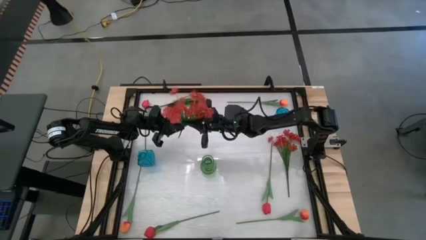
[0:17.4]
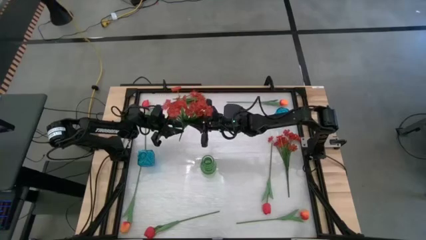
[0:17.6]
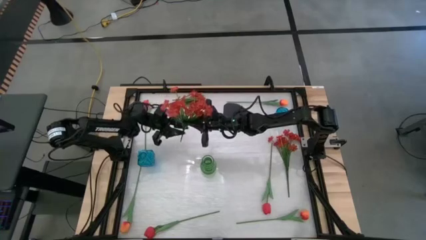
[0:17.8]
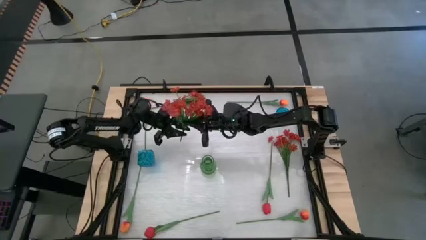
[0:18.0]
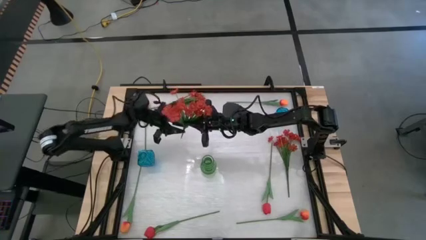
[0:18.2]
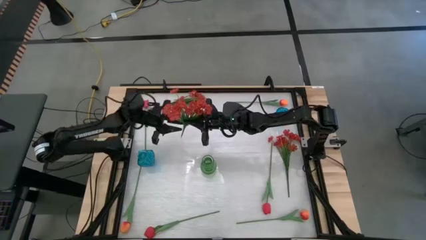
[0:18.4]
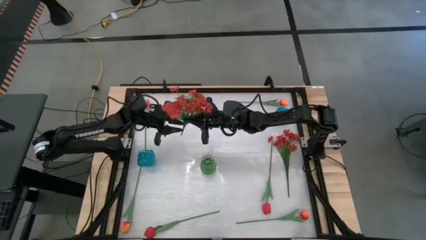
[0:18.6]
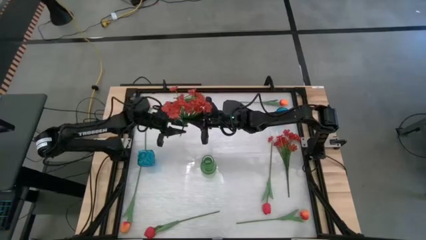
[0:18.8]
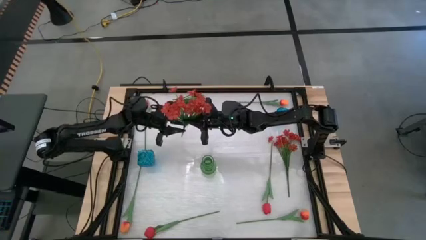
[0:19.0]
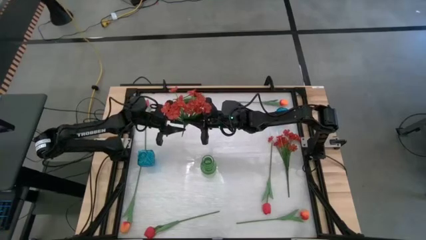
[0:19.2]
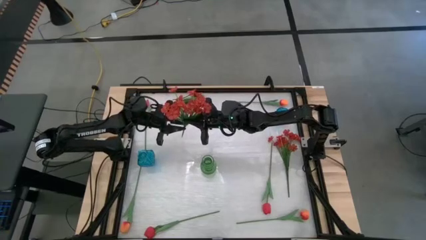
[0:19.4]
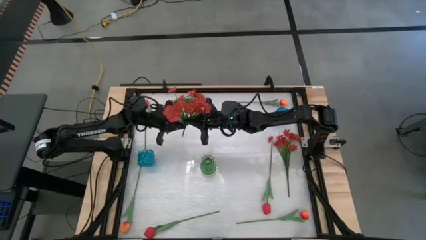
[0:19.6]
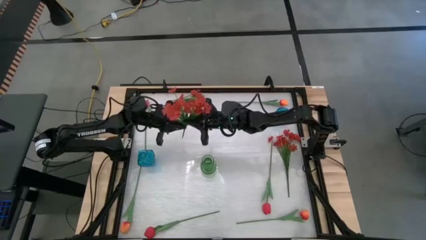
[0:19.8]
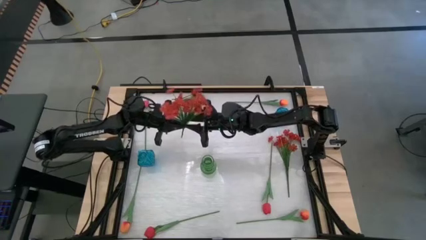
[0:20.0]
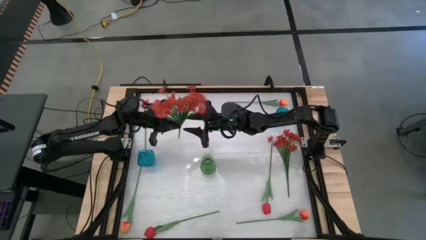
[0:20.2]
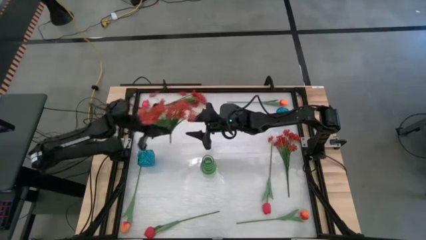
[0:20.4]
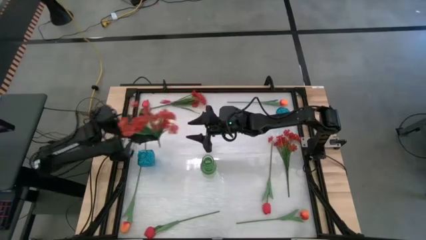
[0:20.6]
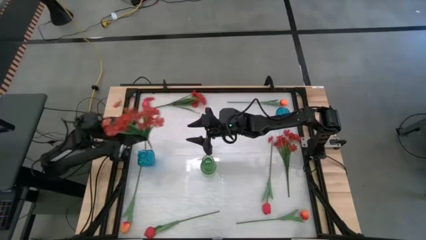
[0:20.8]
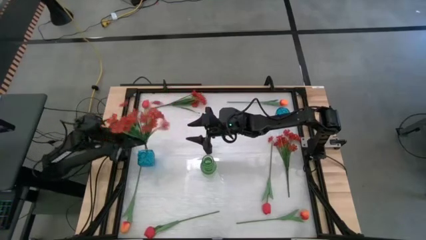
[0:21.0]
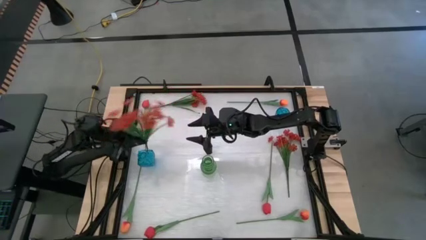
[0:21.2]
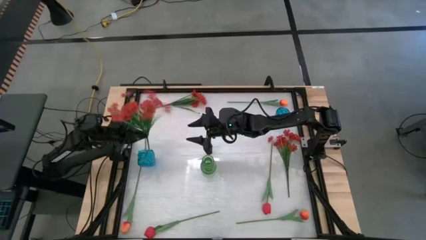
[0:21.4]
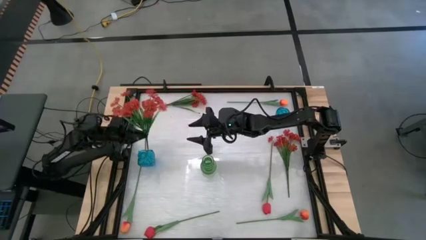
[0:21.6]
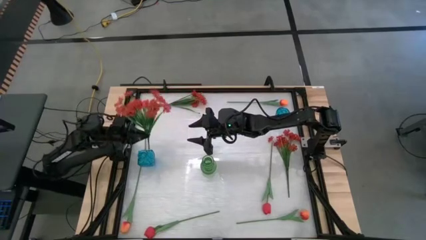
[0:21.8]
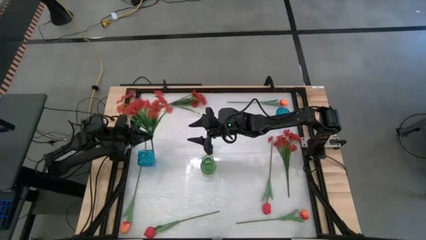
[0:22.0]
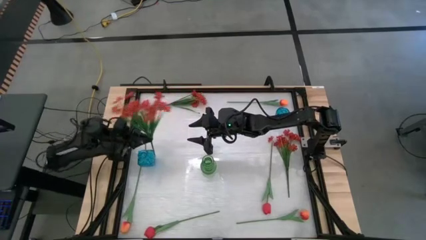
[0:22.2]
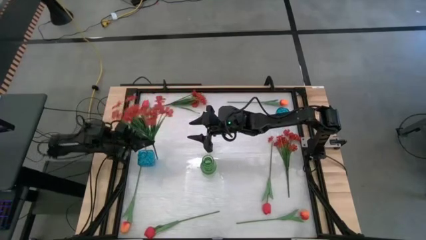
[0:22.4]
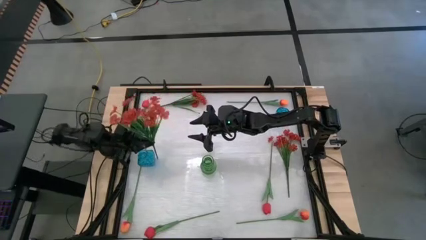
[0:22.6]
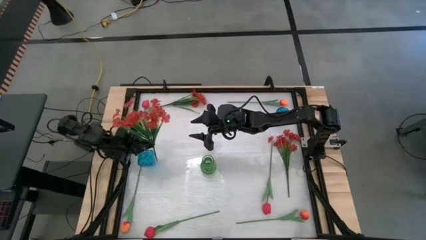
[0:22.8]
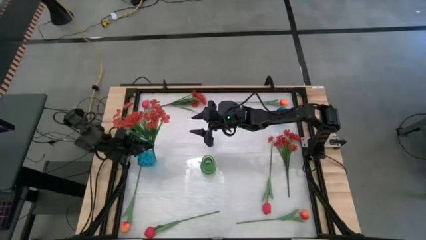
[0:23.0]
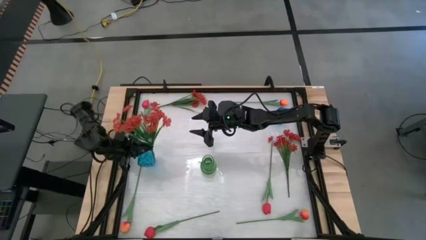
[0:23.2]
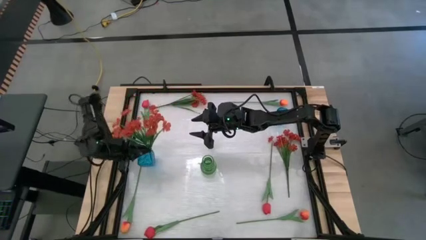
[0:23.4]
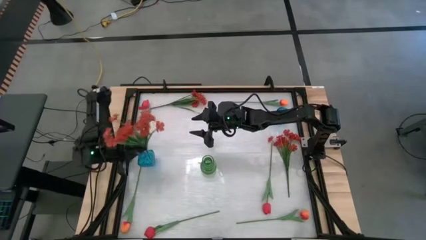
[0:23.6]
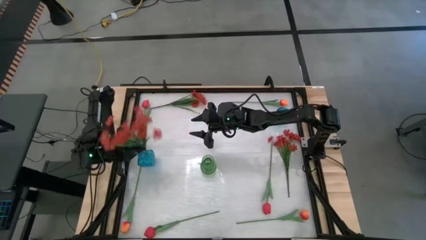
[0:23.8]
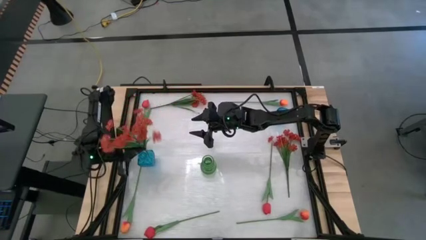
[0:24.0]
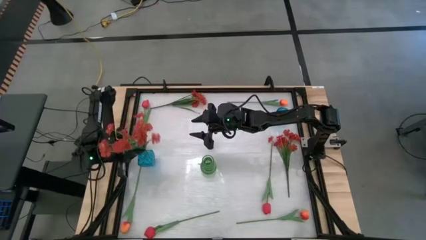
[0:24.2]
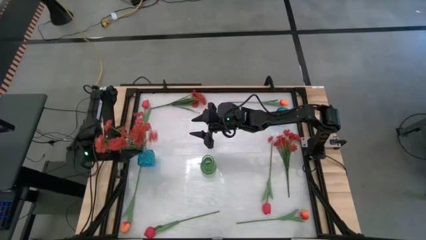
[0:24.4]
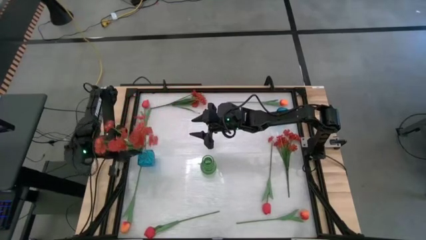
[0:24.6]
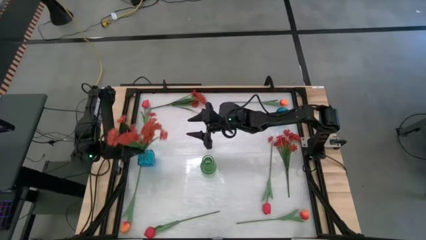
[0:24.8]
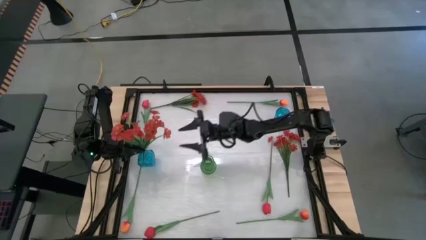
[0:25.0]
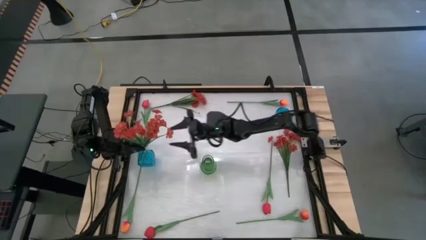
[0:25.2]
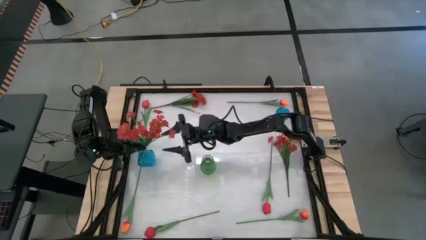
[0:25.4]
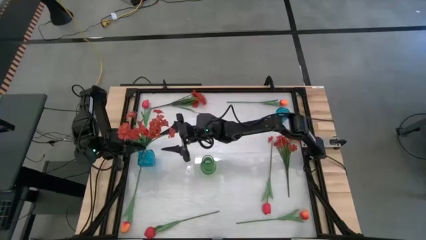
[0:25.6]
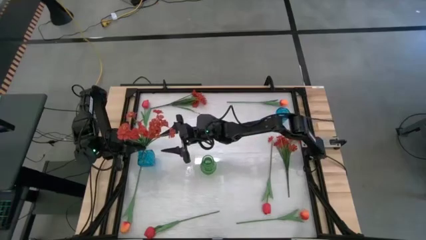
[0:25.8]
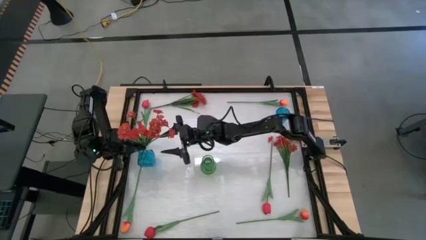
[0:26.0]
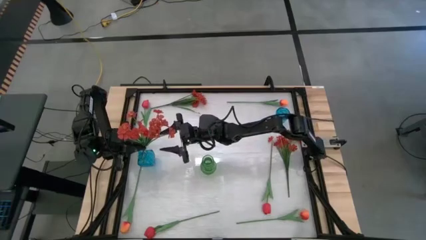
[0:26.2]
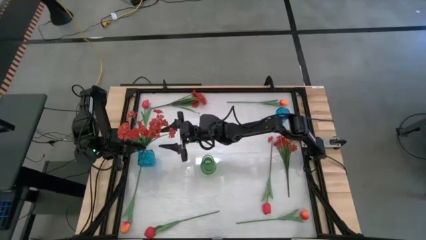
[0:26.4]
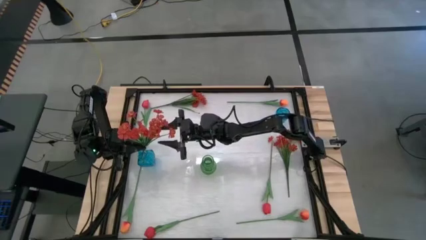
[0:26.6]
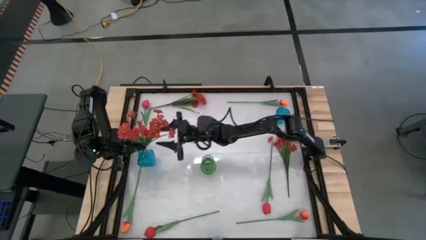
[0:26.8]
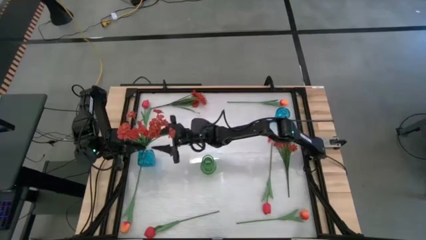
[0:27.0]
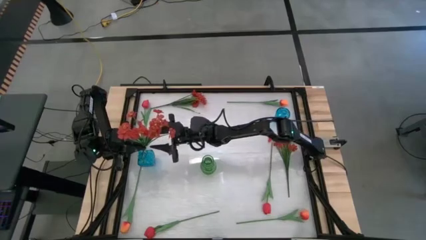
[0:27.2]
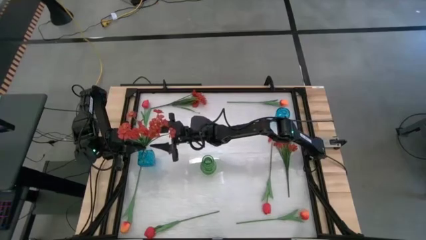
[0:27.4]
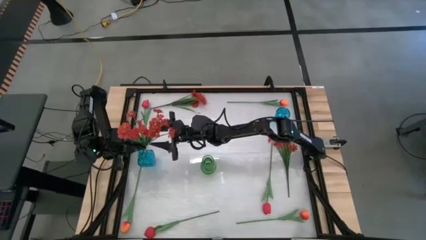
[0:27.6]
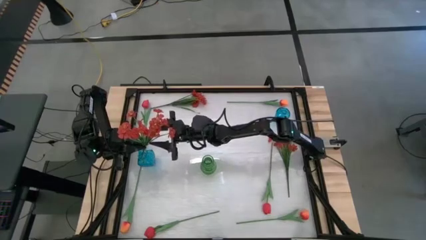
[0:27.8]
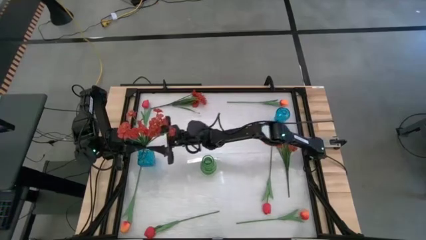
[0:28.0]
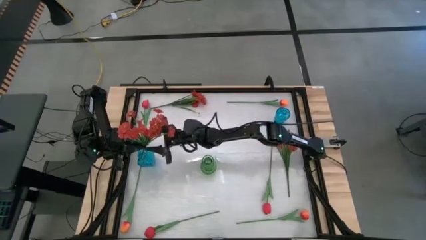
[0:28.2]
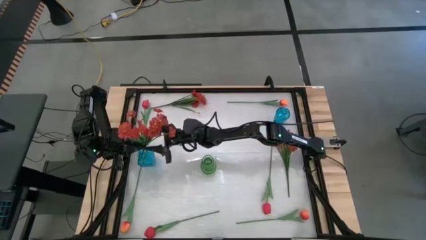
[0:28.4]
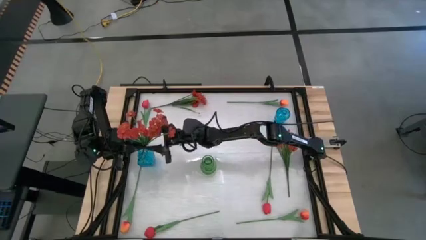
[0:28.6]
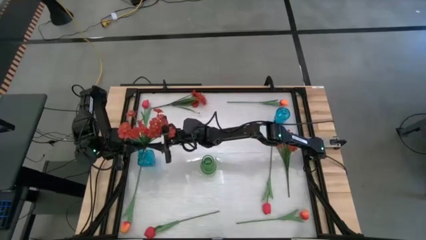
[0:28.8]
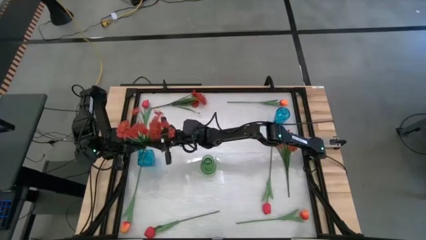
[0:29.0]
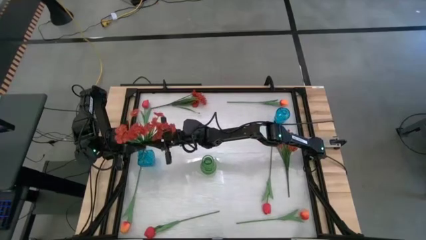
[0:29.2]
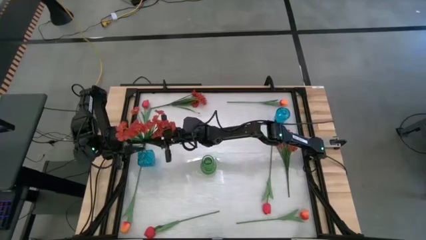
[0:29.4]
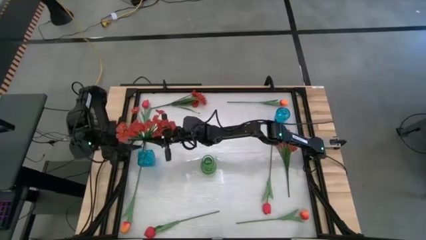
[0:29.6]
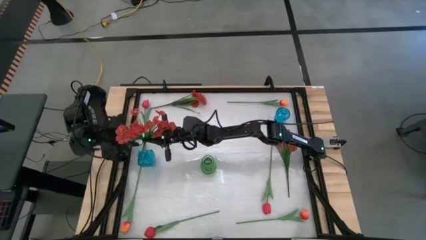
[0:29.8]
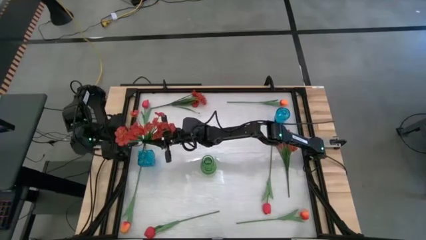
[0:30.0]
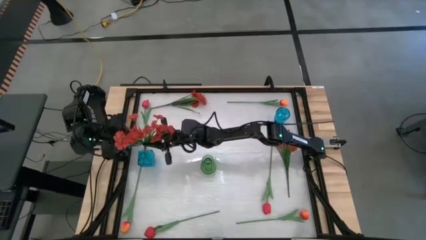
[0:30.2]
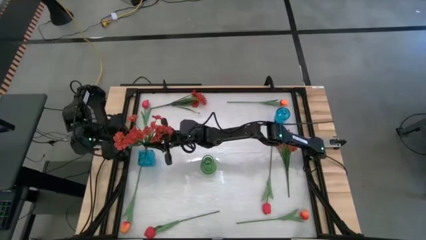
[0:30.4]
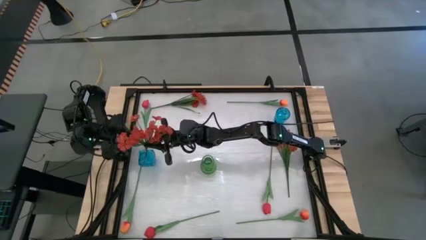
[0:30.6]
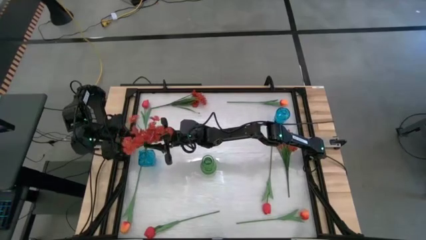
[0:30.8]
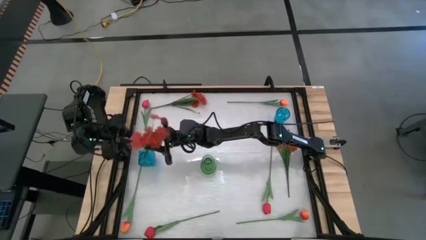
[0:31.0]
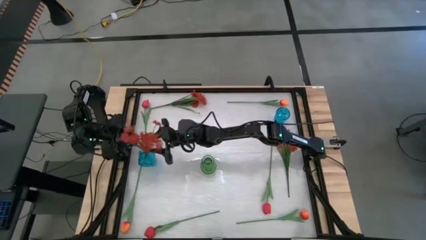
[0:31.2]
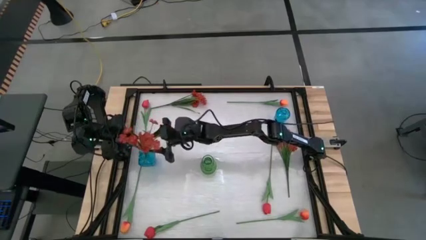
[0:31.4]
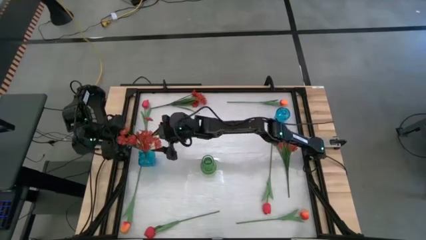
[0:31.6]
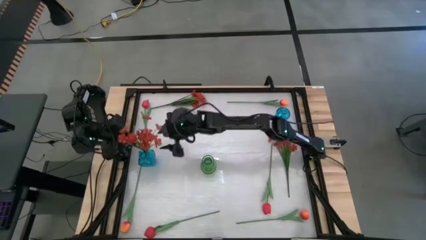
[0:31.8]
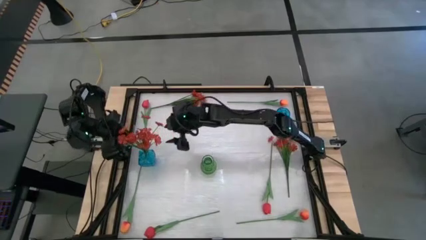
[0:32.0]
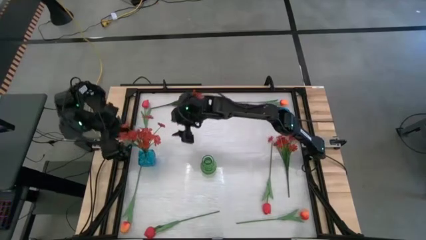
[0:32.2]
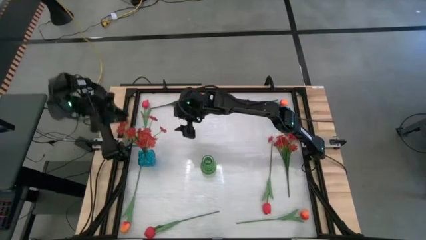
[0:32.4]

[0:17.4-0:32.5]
Task: Sort flowers into vase by color
Put the bottom red flowers into the left blue vase
